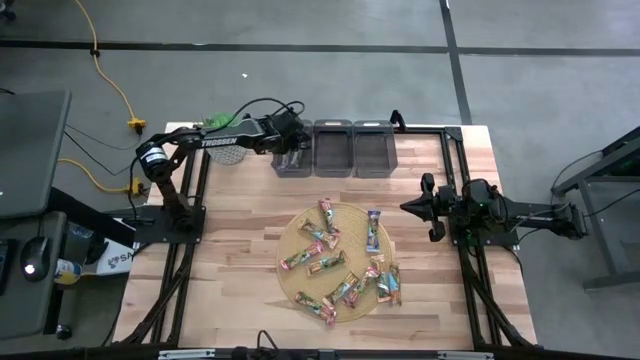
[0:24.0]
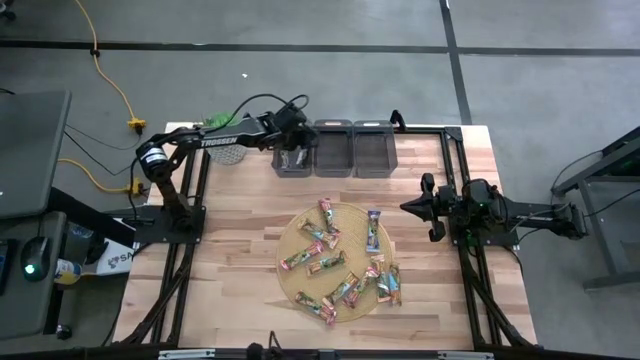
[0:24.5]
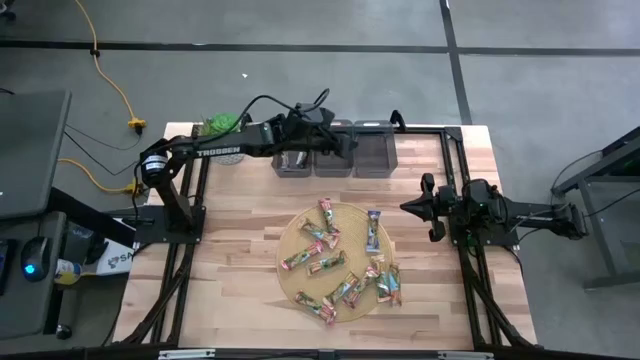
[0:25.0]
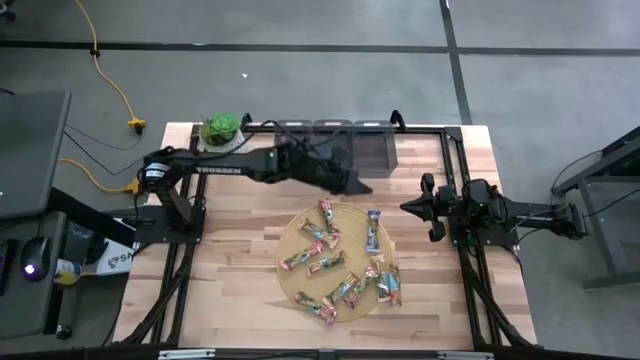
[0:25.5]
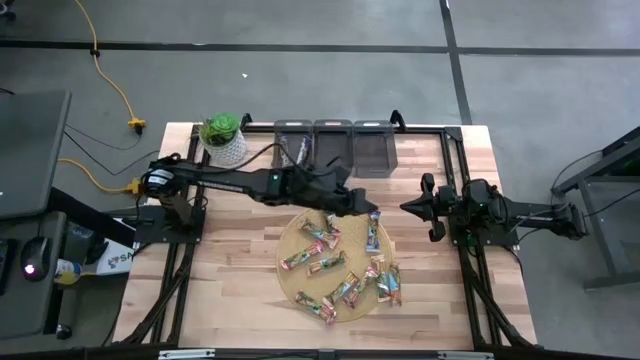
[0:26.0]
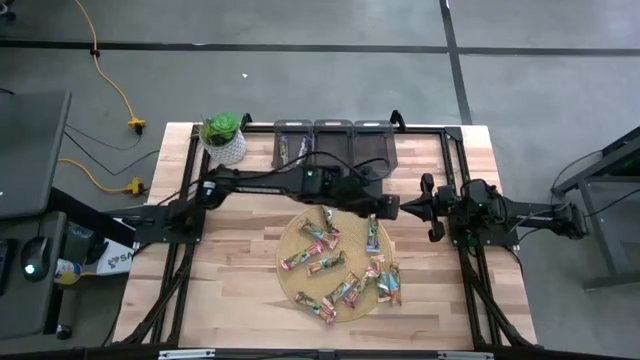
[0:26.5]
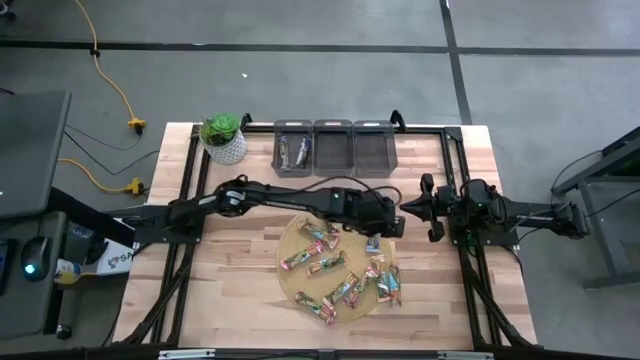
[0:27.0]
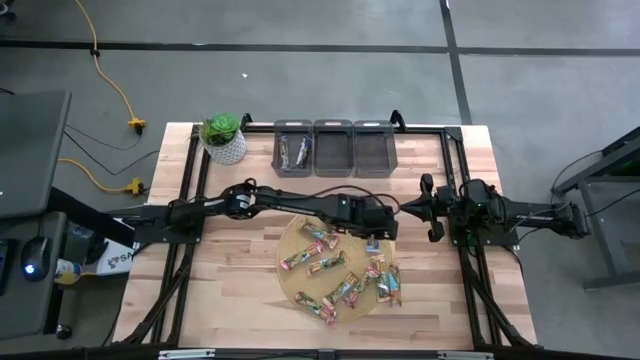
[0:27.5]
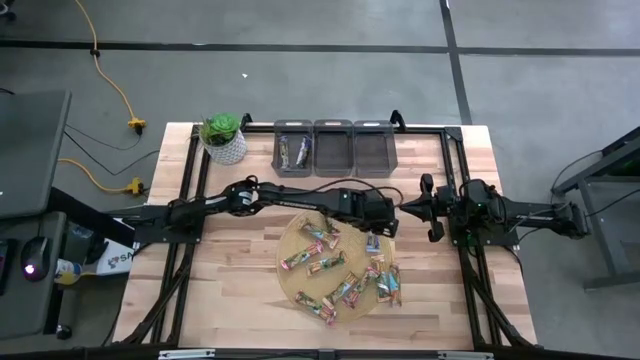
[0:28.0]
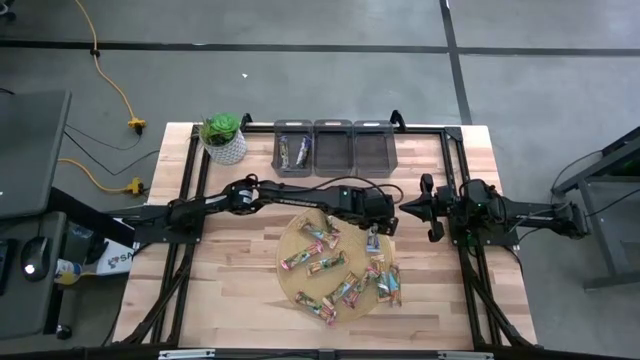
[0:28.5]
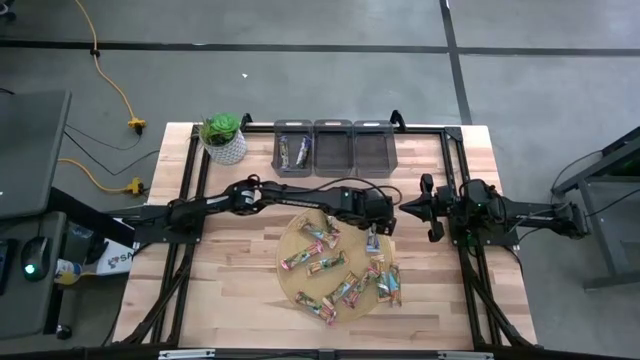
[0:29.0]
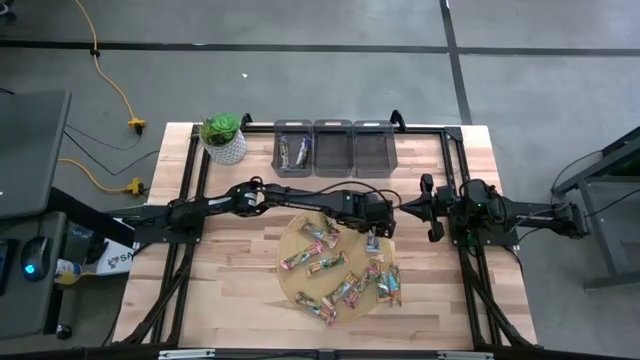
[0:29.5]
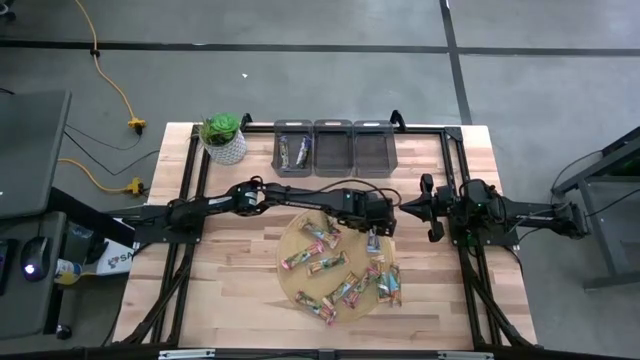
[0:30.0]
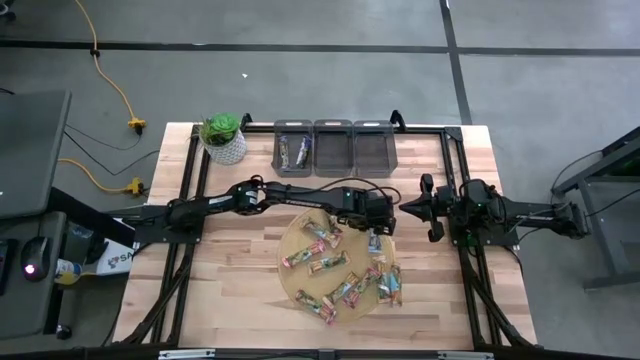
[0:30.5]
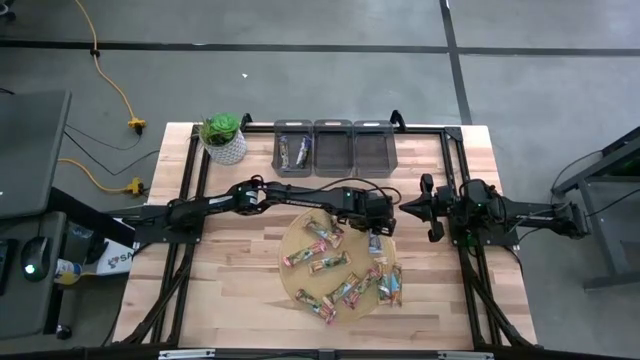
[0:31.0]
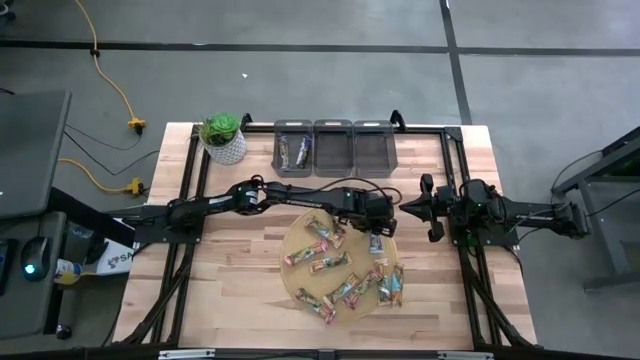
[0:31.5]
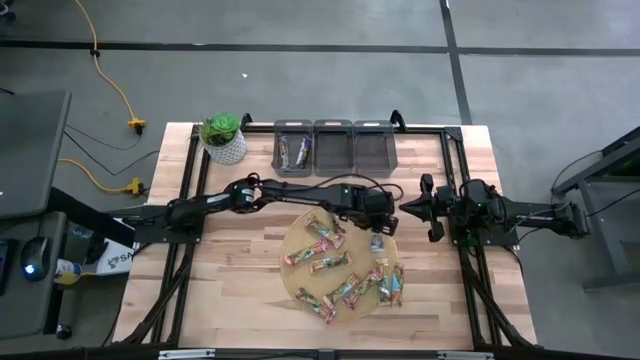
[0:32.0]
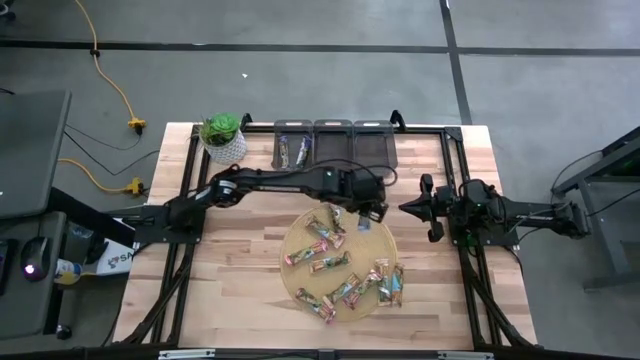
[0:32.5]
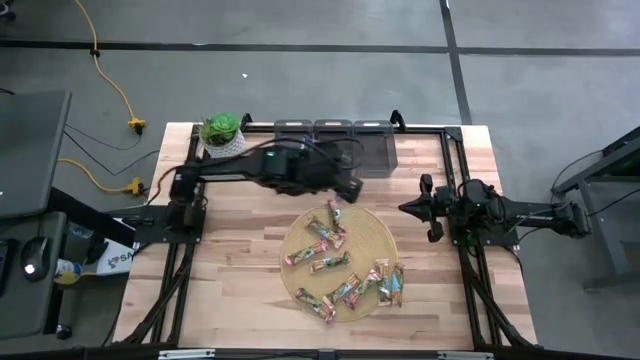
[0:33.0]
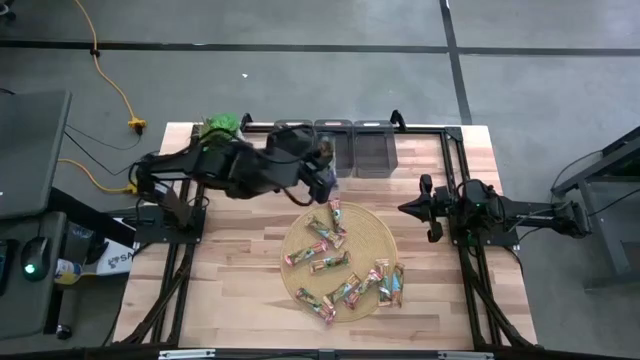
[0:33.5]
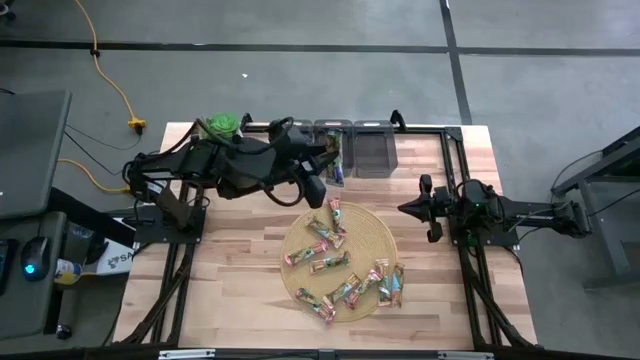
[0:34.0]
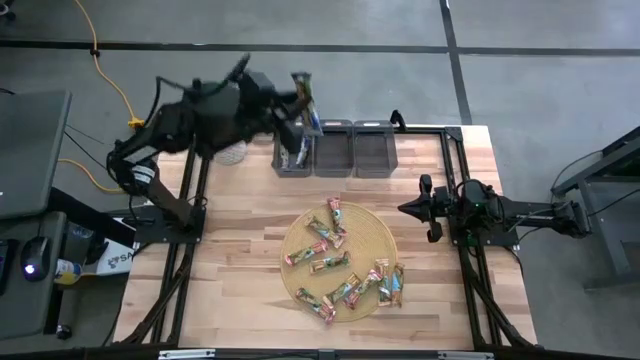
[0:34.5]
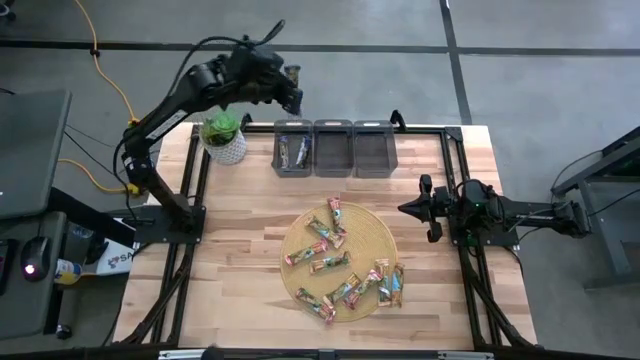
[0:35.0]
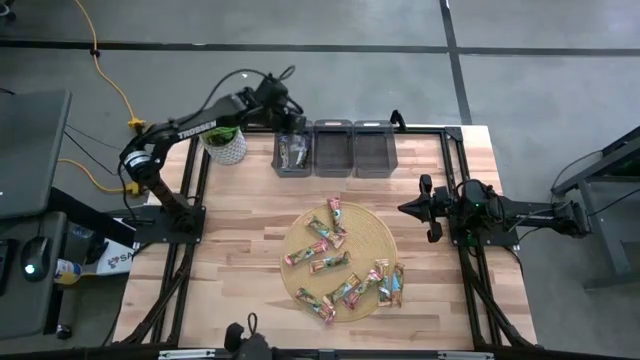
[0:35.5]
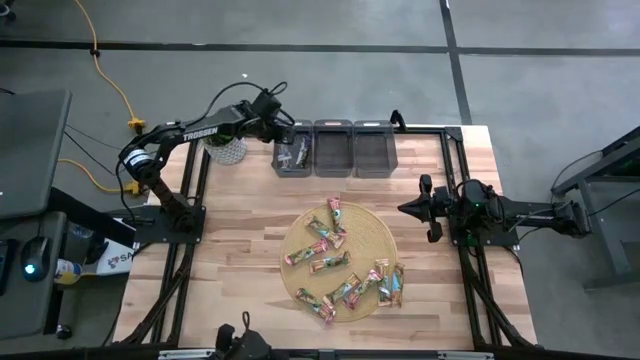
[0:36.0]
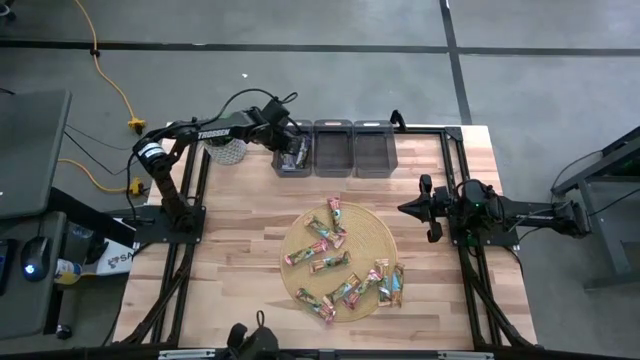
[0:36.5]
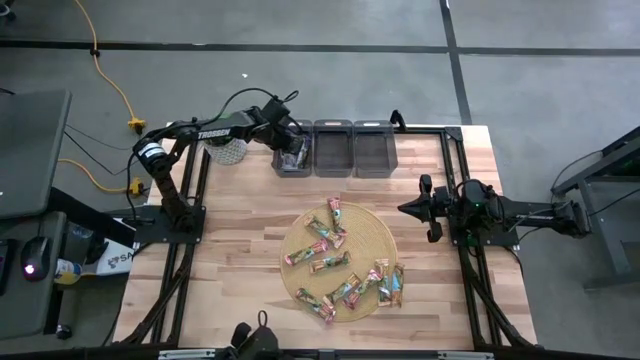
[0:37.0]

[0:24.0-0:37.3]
Task: Pick and place Granola Bars by type
Put the blue granola bar into the left black bin

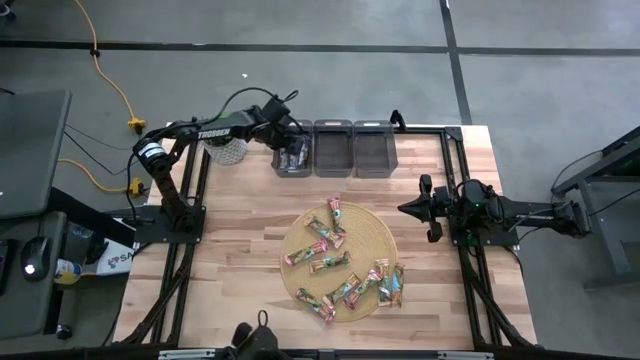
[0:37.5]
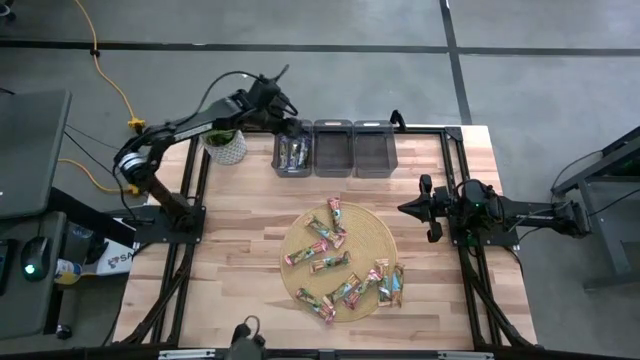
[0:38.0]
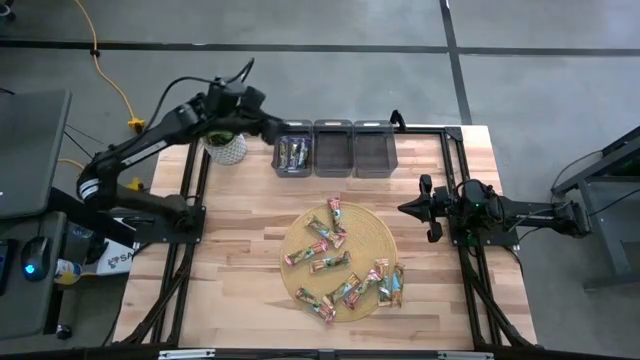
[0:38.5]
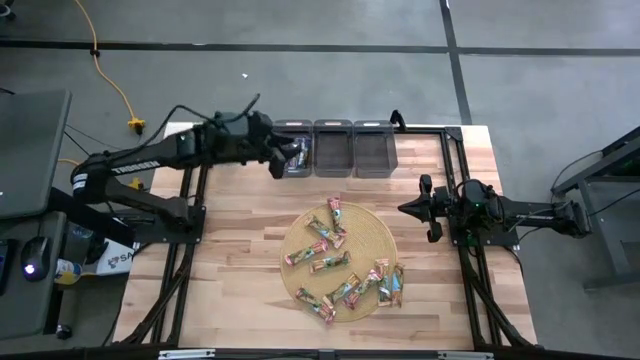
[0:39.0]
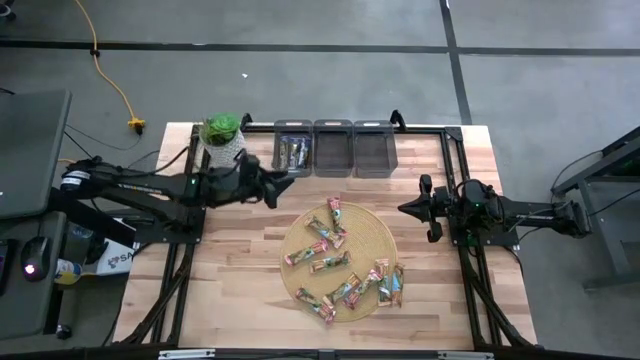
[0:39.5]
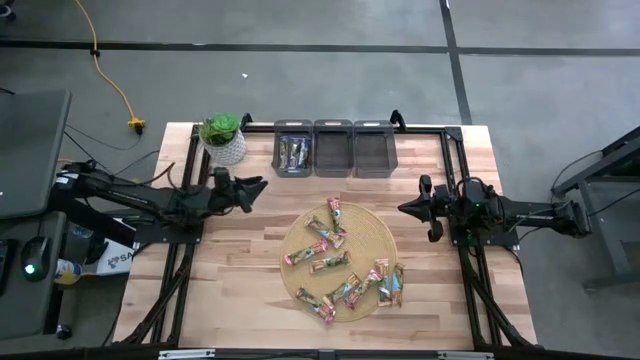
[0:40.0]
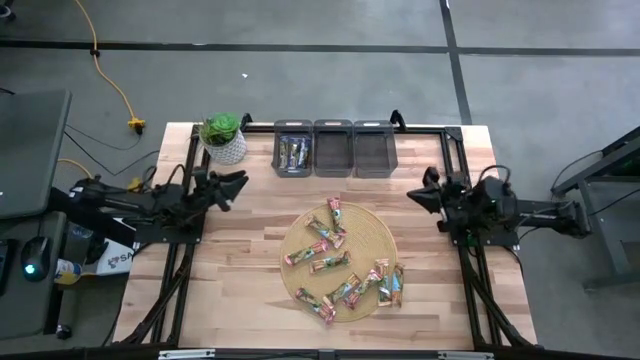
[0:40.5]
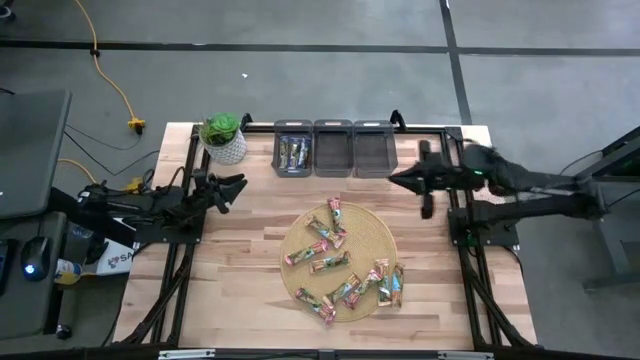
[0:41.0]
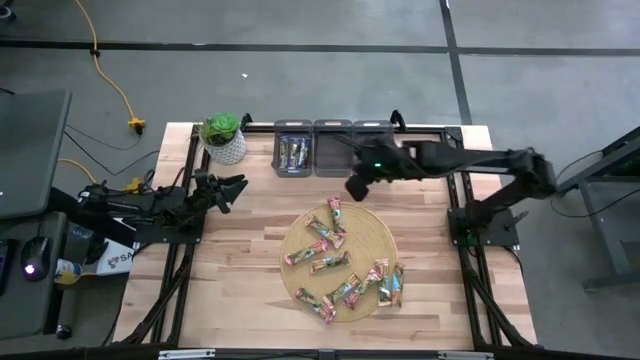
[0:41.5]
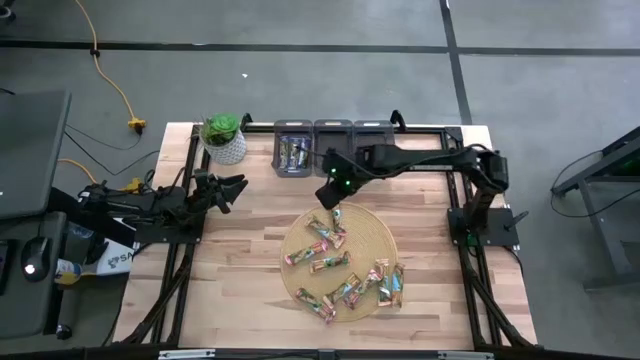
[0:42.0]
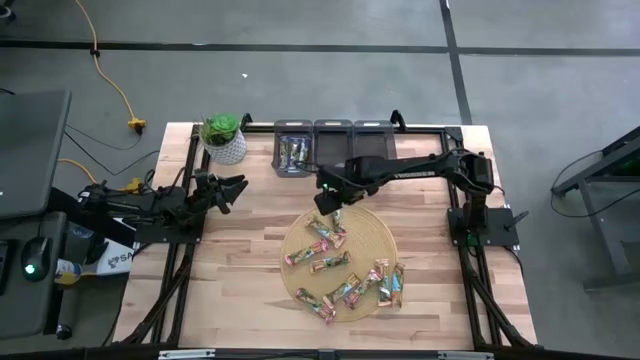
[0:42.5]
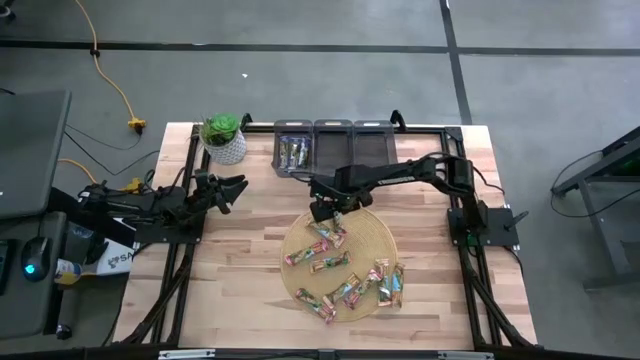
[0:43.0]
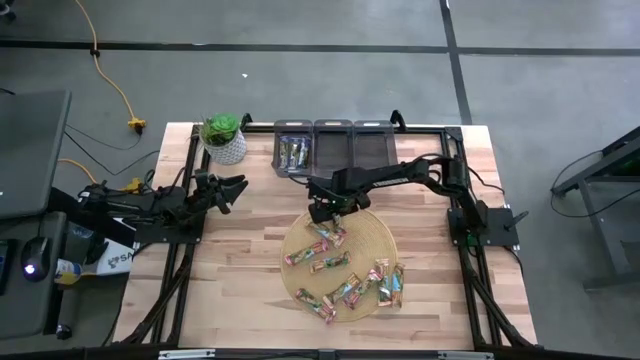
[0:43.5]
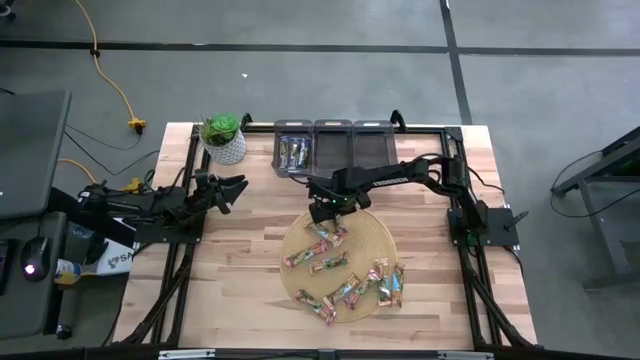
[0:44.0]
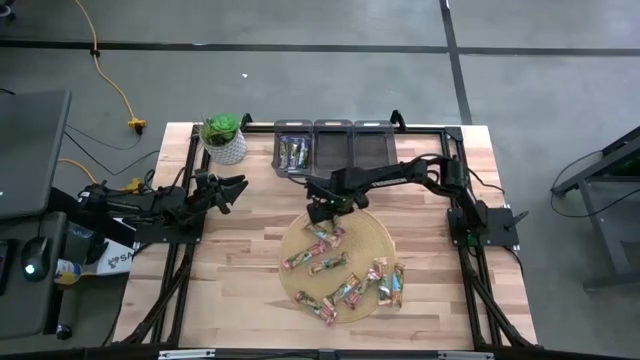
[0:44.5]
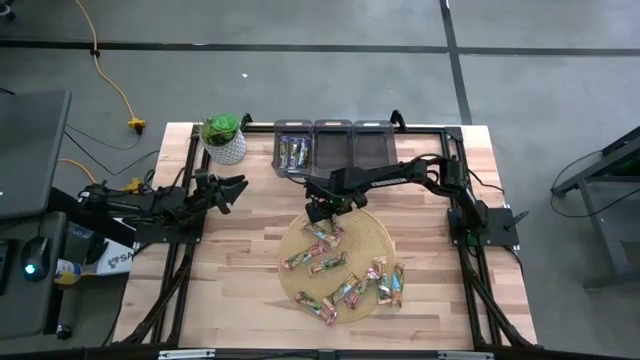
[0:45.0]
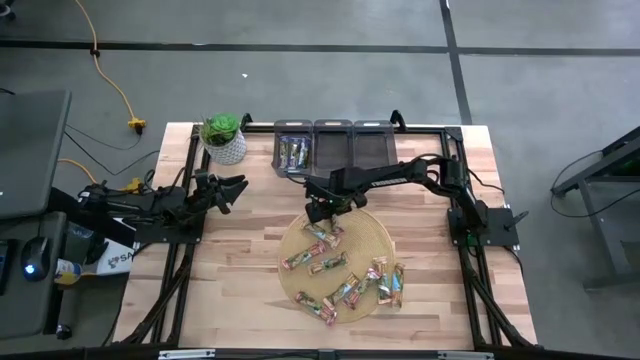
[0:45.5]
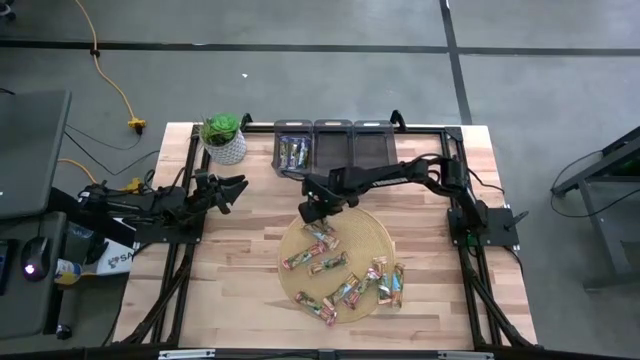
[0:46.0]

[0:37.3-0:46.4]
Put the red granola bar into the middle black bin
